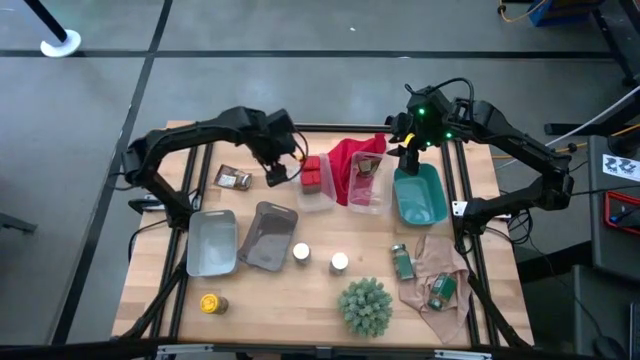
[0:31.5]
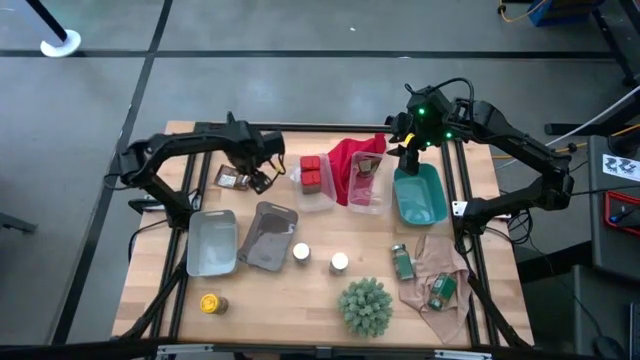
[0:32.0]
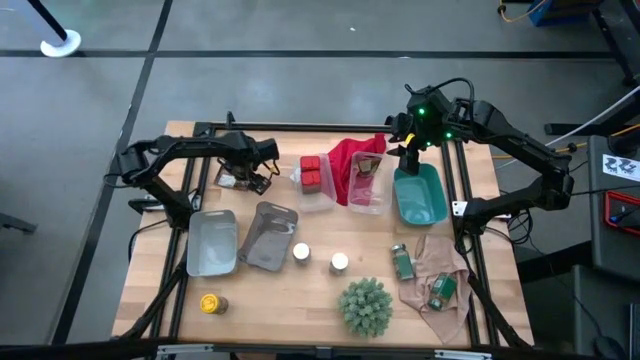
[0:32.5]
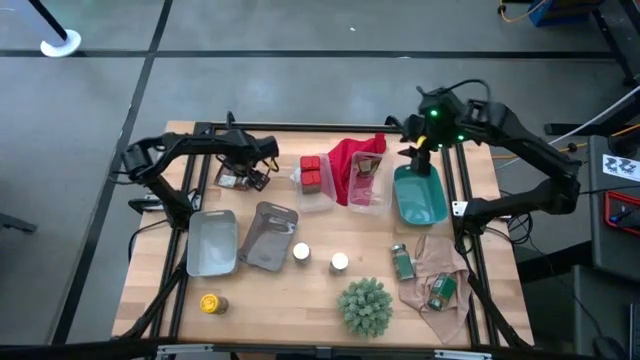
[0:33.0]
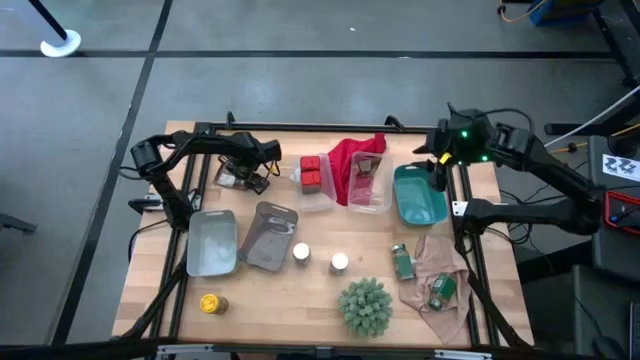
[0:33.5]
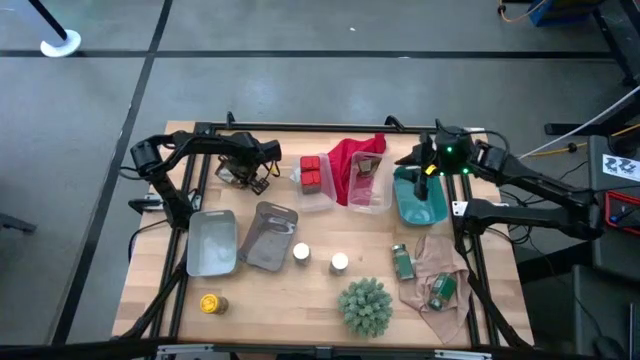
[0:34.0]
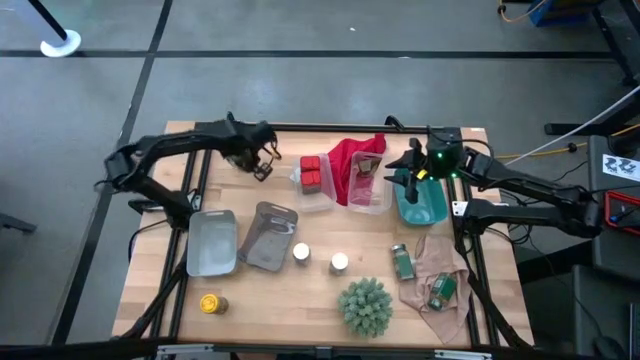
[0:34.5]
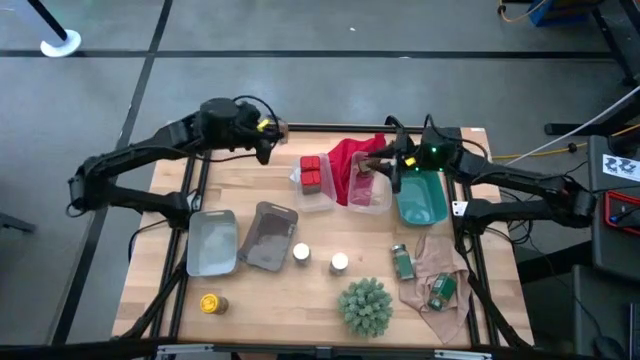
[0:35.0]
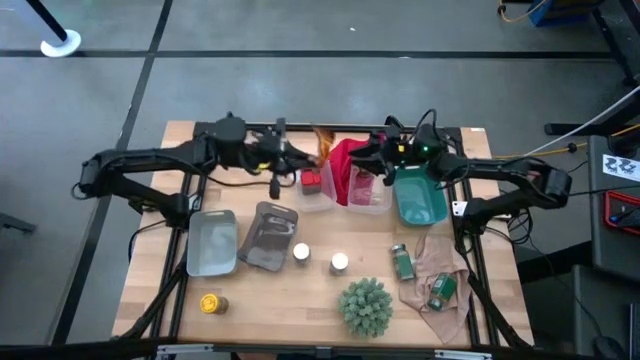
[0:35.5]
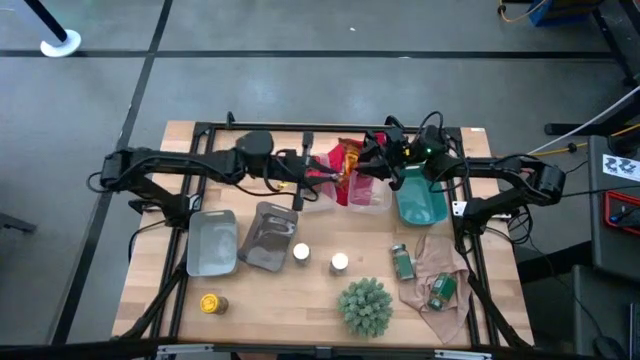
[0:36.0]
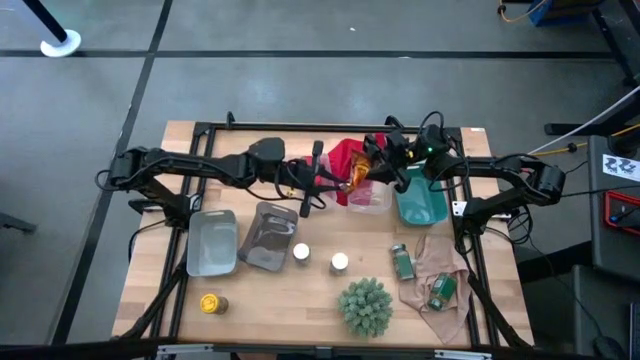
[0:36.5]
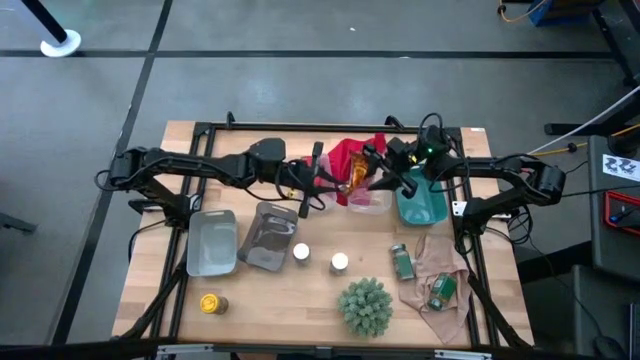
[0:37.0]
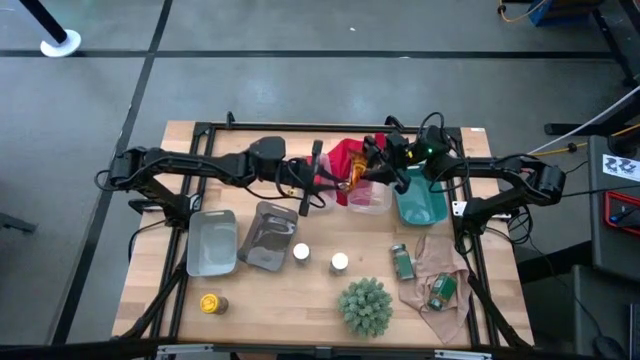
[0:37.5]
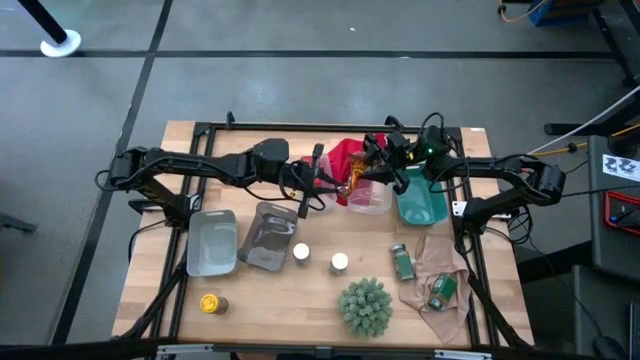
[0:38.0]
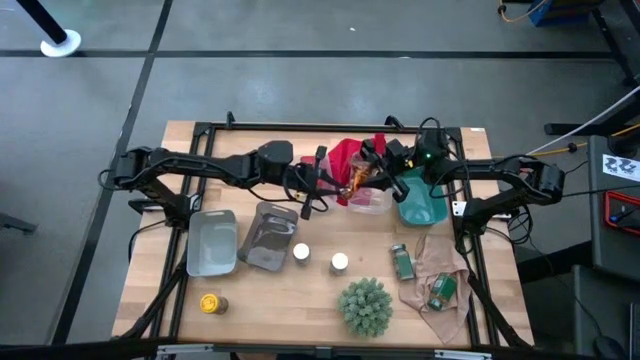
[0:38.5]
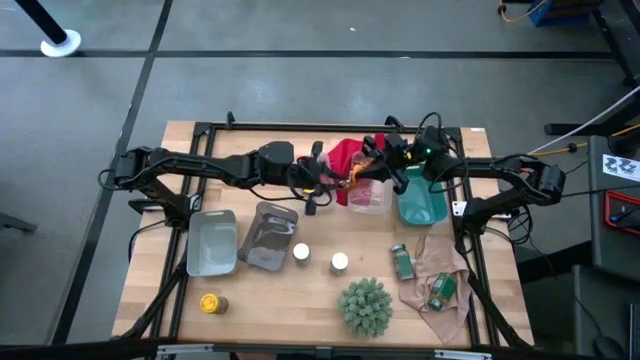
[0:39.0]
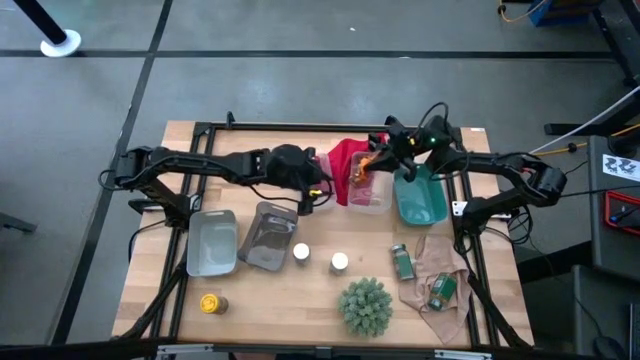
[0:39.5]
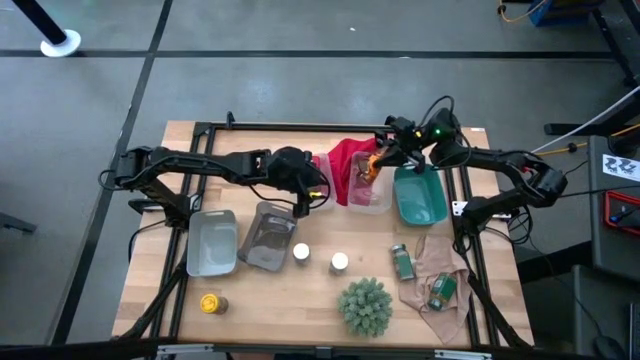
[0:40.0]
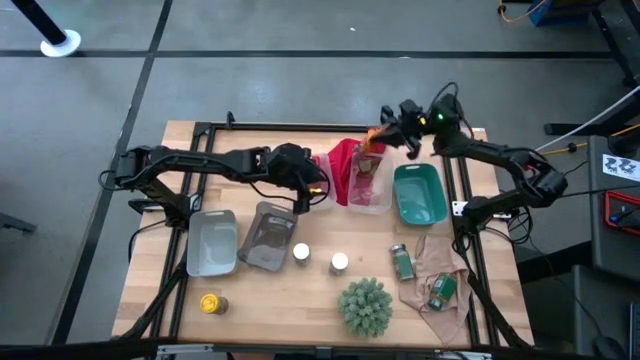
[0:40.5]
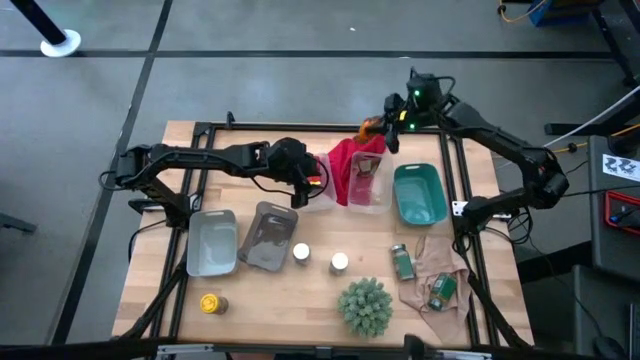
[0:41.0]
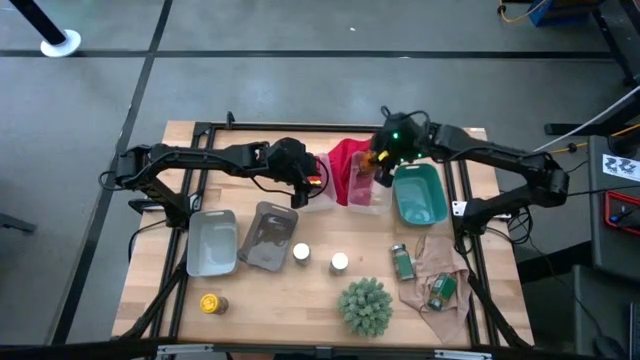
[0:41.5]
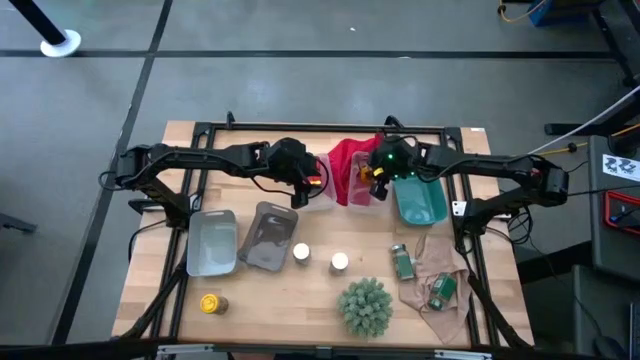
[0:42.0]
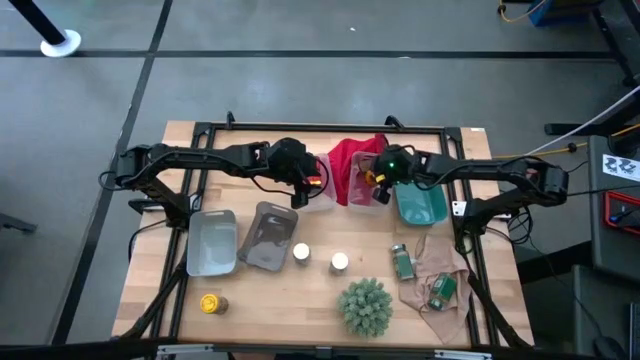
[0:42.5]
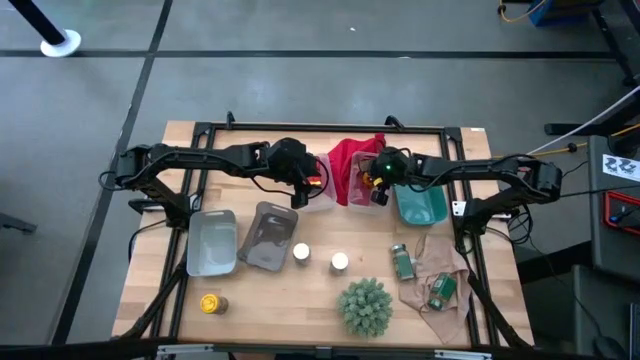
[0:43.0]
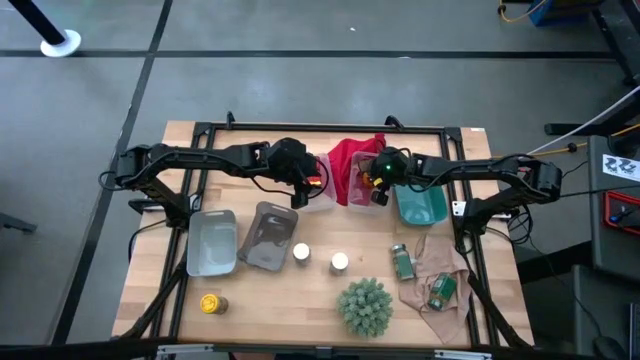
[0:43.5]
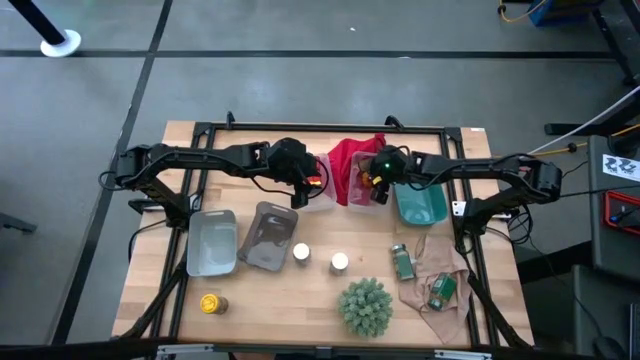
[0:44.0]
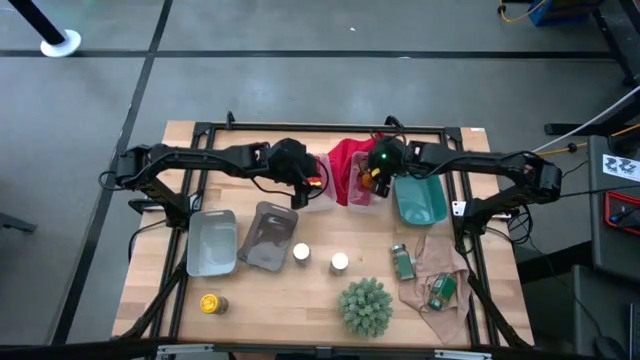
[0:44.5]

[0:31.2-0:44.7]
Task: Sort spices by type
Put the orange seasoning pack into the right transparent bin

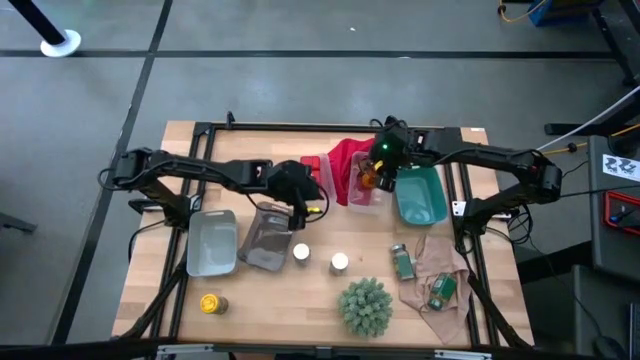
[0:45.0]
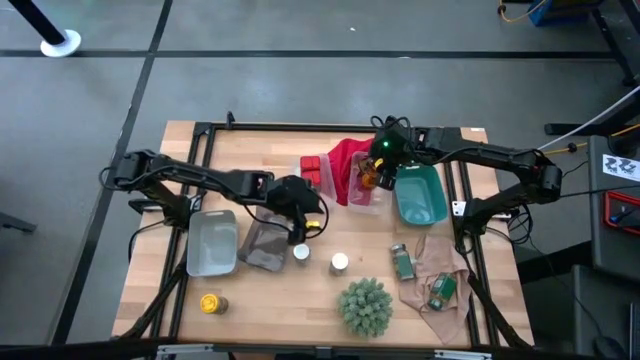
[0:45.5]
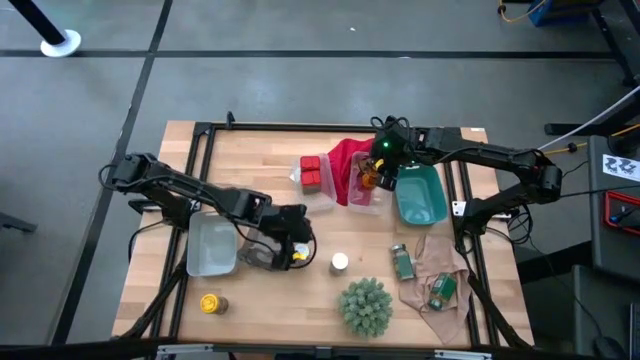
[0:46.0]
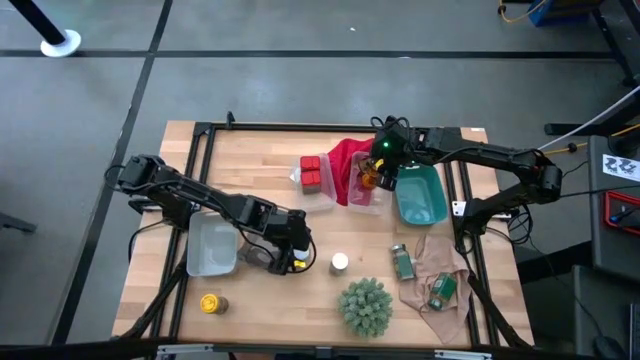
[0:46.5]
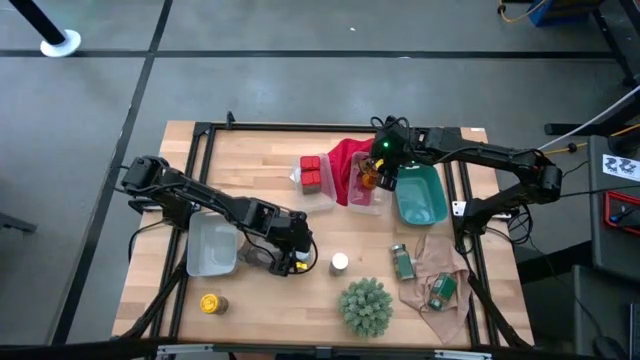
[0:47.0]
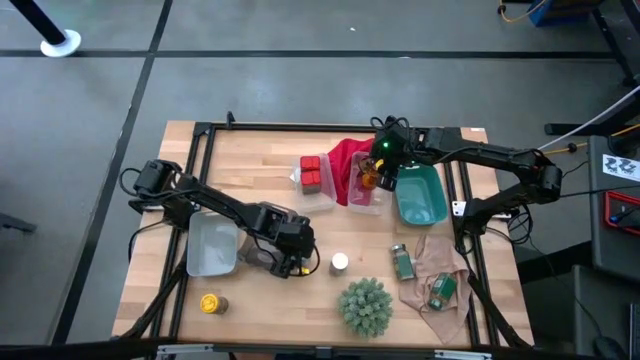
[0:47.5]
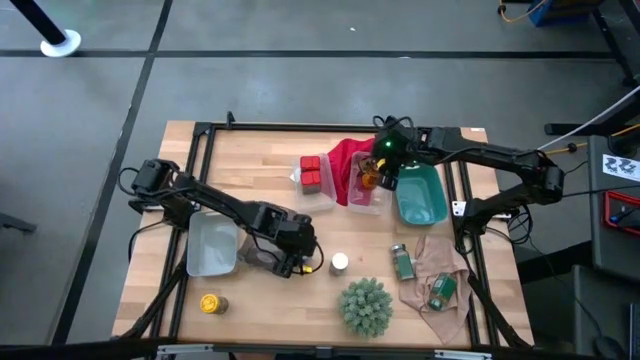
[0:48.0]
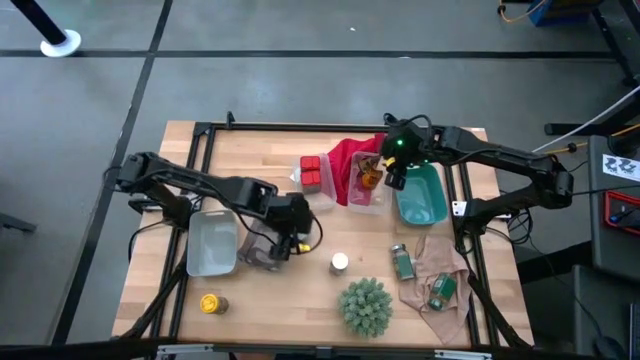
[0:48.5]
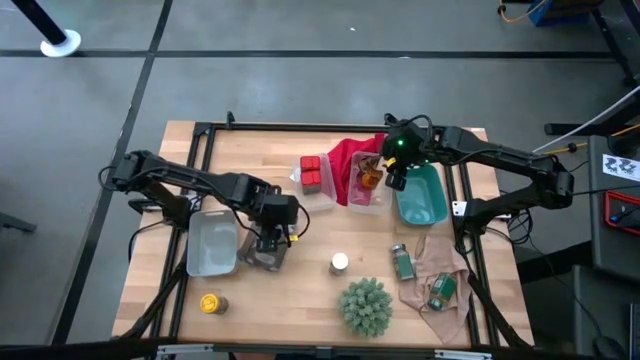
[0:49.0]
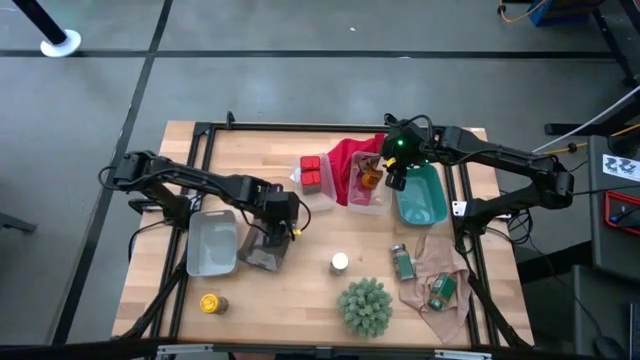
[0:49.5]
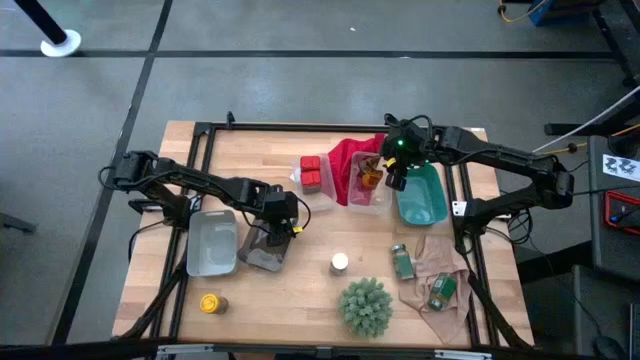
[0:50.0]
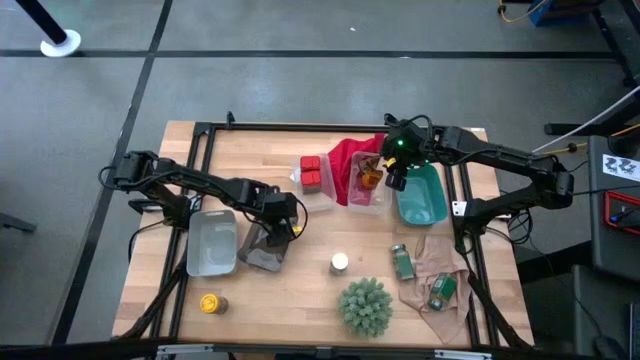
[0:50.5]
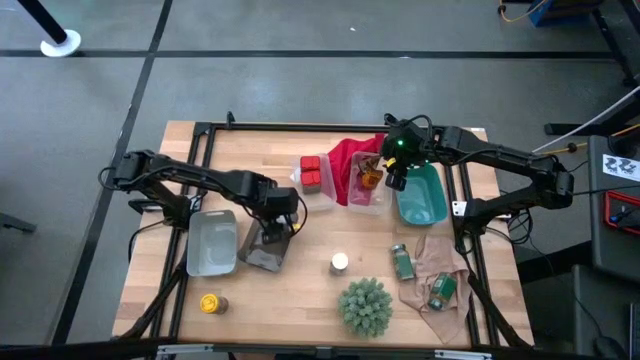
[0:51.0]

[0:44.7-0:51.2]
Put the left white seasoning bottle into the black bin

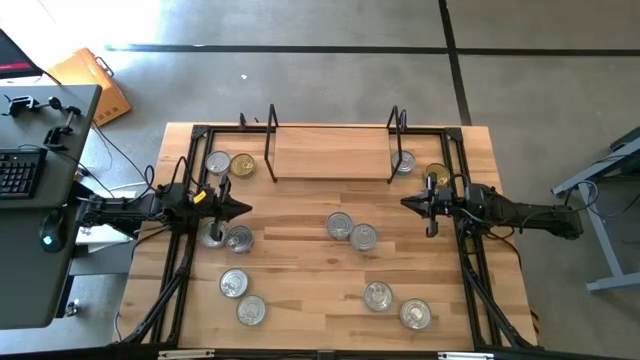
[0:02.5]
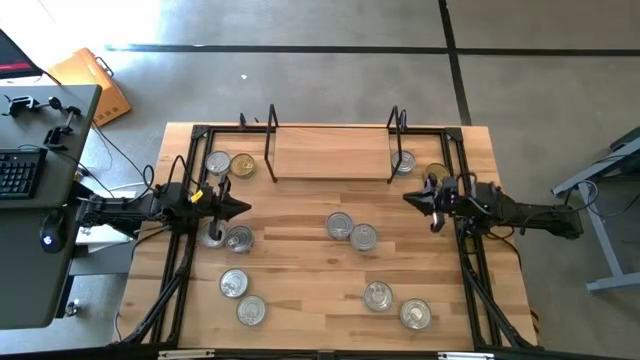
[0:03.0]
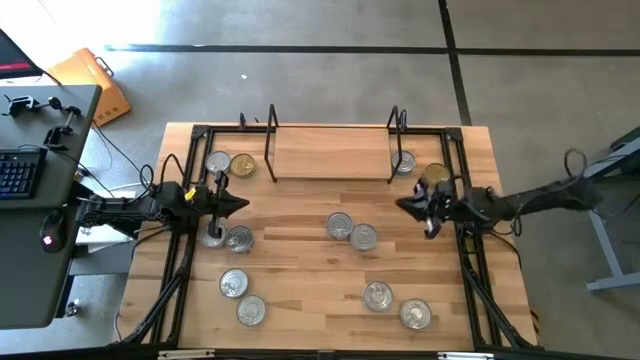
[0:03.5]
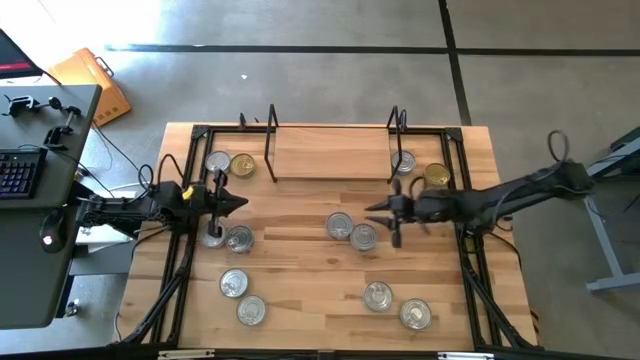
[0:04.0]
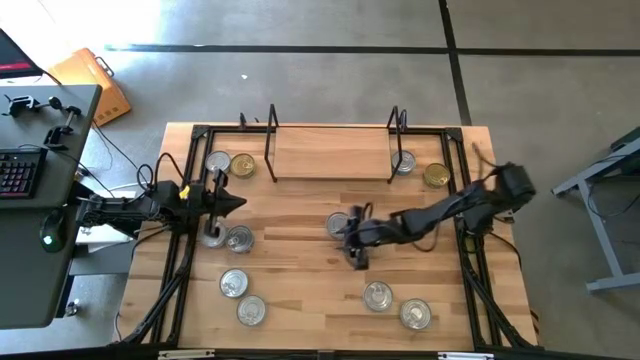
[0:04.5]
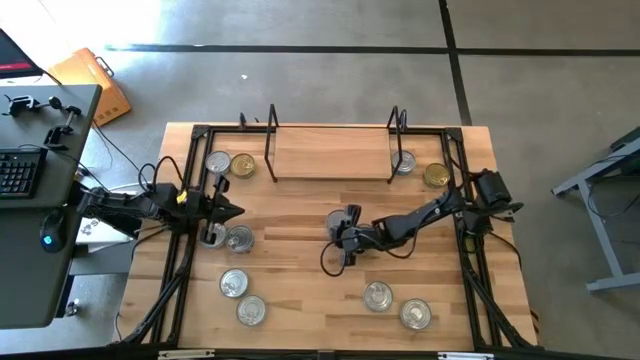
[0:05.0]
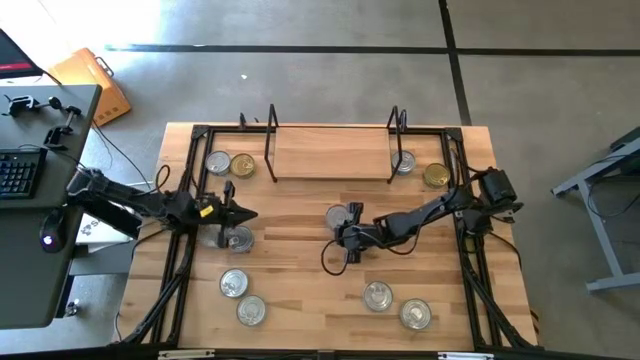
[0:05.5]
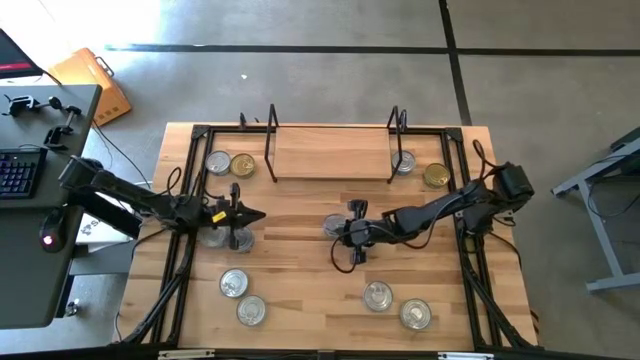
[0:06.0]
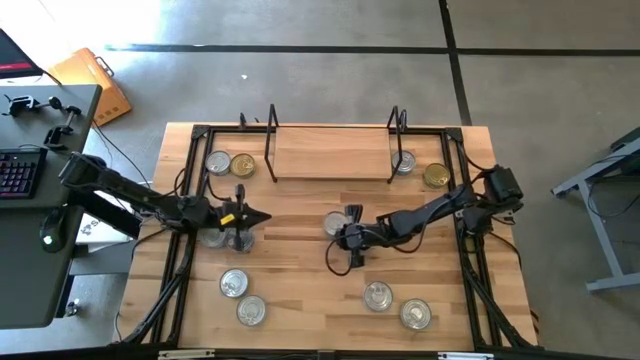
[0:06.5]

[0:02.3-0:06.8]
Task: Stack canned seafood by type on shelf
Put the blue tuna can on the shelf
